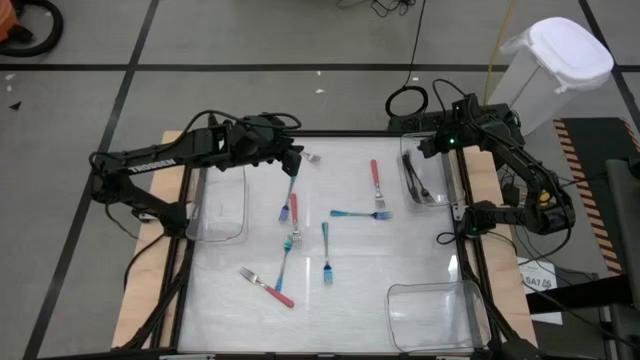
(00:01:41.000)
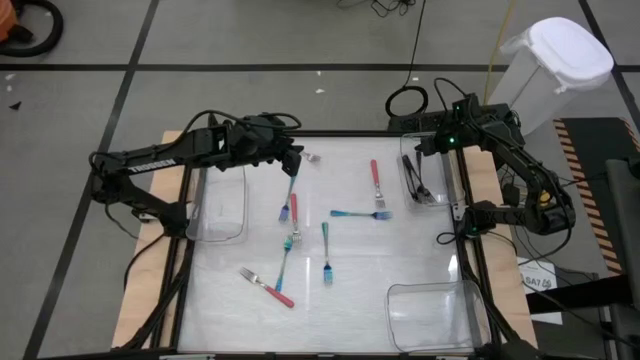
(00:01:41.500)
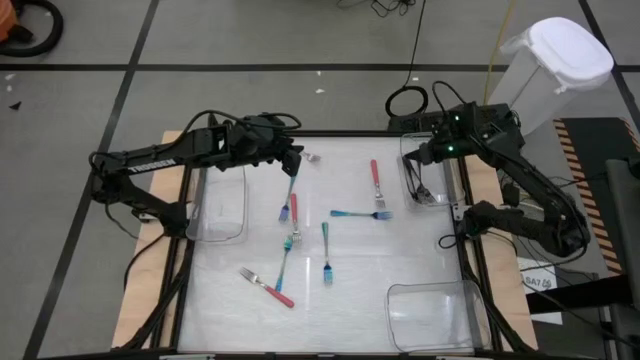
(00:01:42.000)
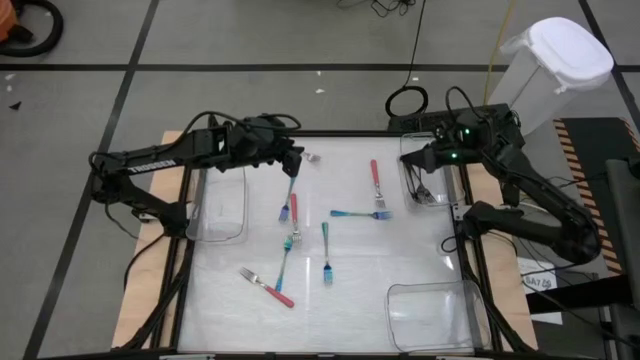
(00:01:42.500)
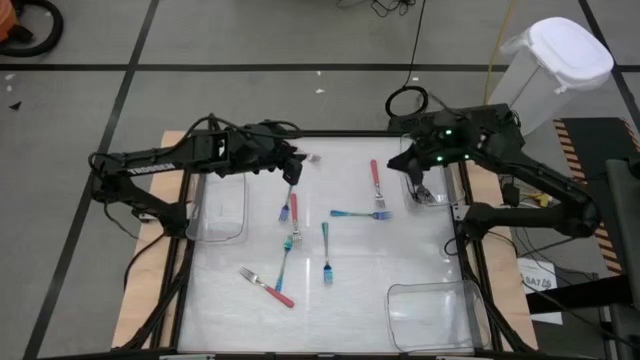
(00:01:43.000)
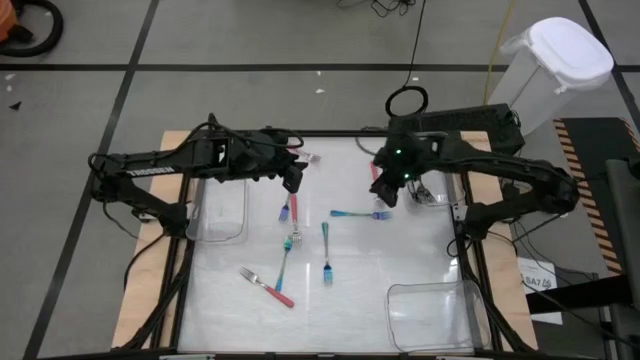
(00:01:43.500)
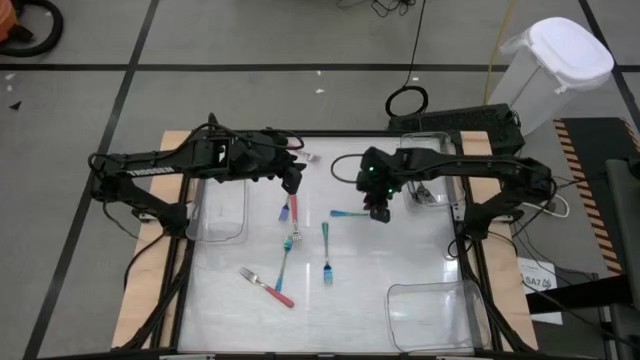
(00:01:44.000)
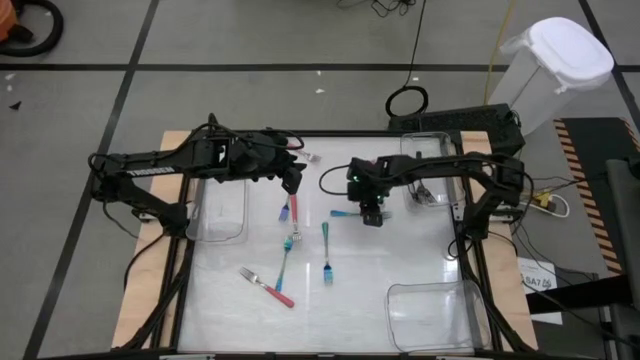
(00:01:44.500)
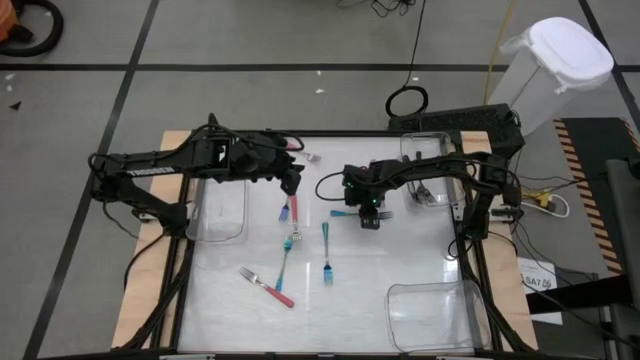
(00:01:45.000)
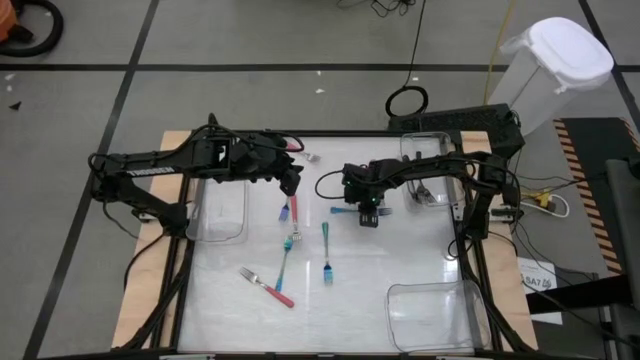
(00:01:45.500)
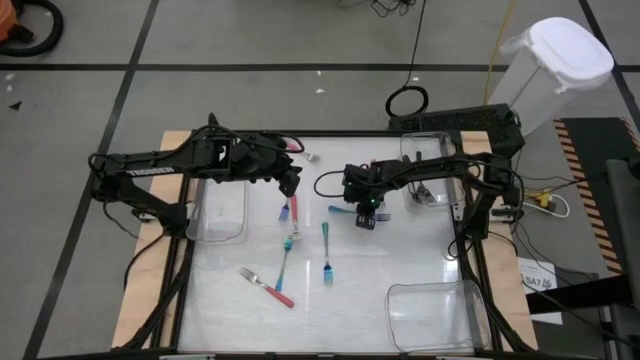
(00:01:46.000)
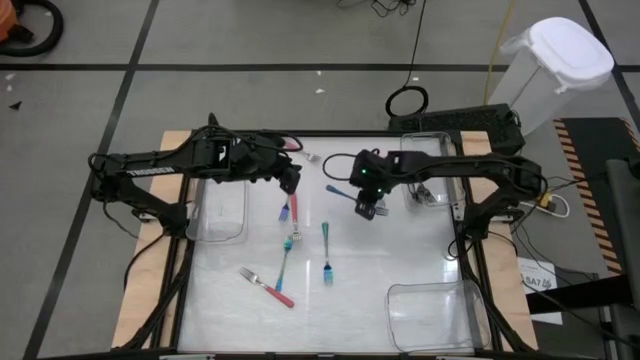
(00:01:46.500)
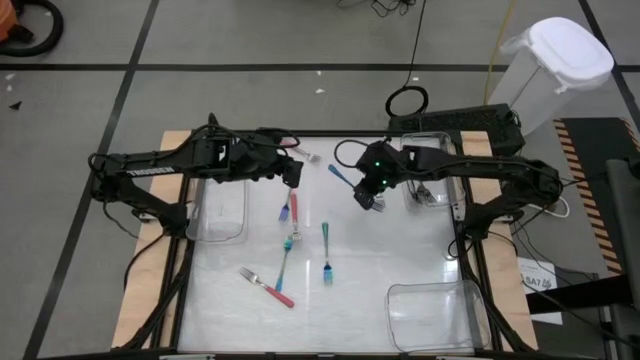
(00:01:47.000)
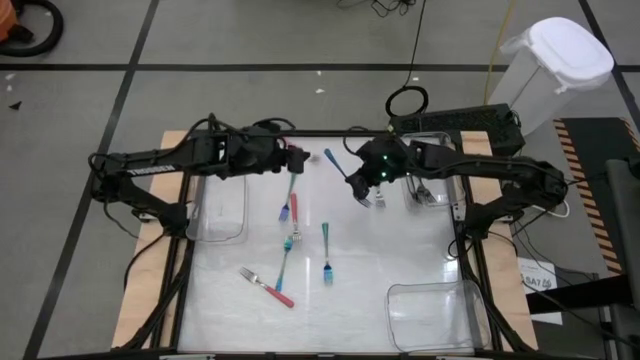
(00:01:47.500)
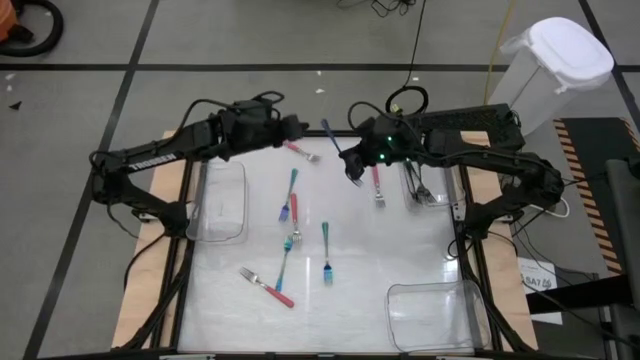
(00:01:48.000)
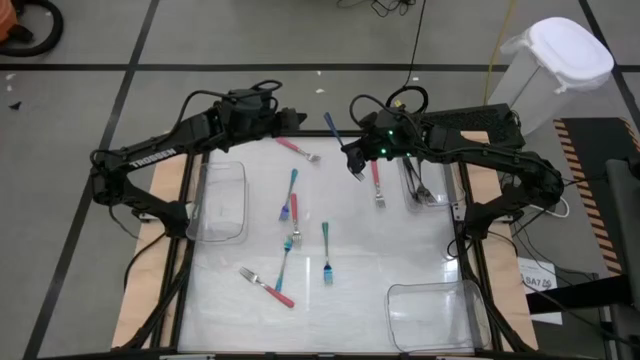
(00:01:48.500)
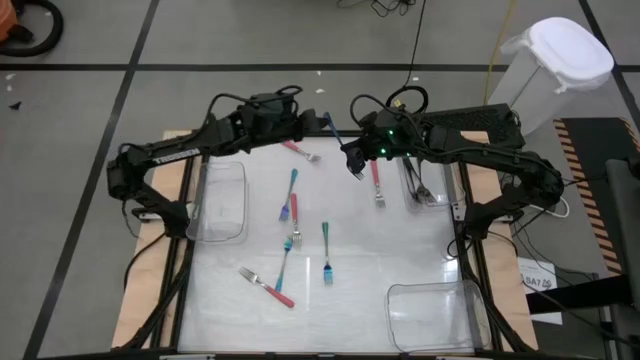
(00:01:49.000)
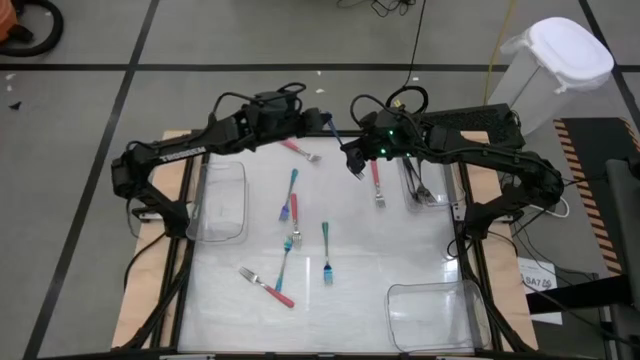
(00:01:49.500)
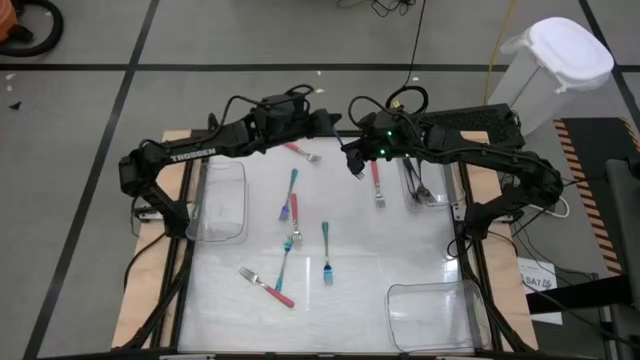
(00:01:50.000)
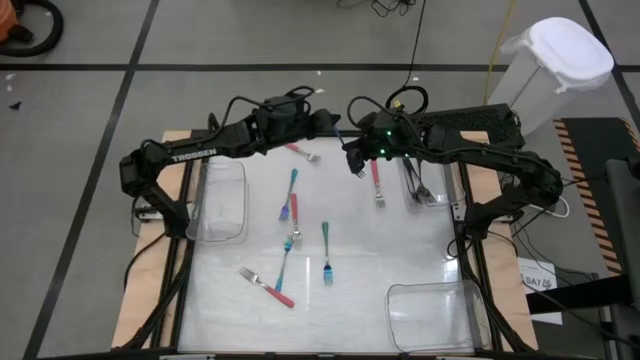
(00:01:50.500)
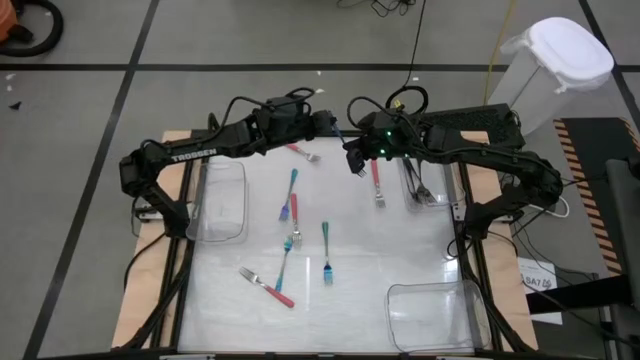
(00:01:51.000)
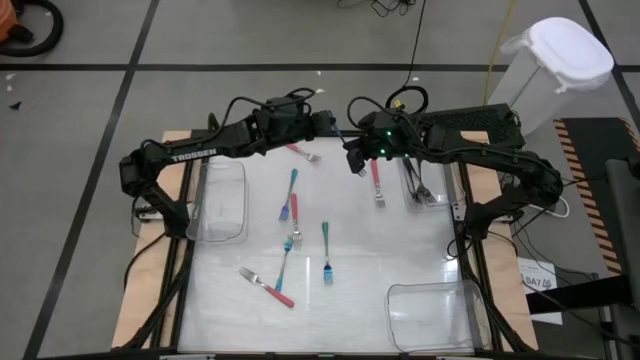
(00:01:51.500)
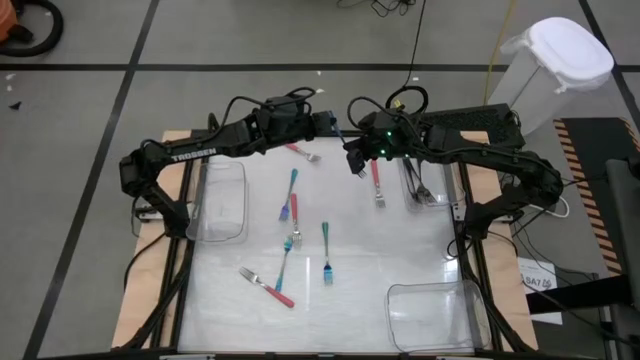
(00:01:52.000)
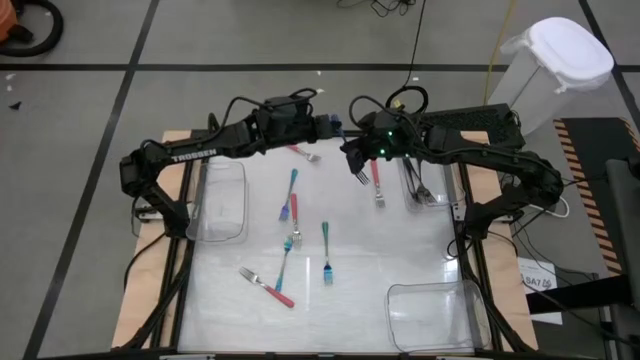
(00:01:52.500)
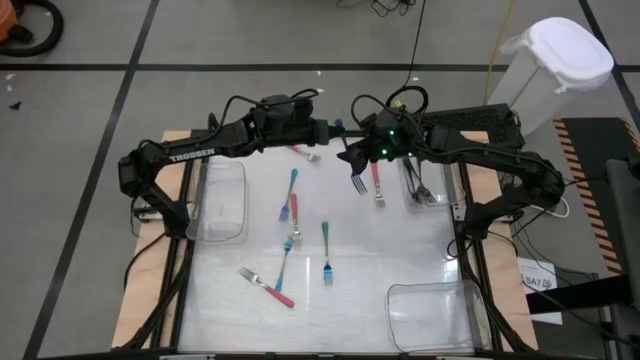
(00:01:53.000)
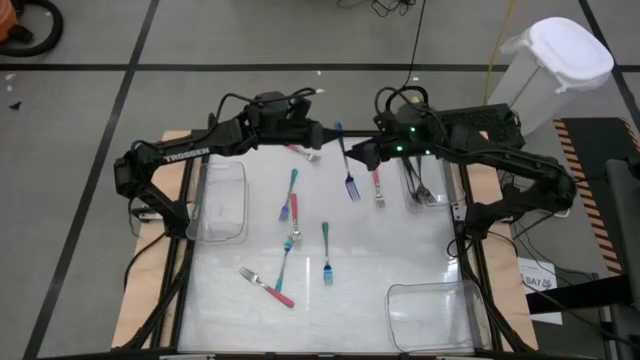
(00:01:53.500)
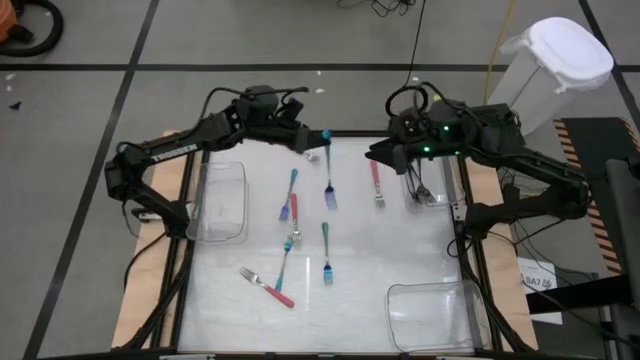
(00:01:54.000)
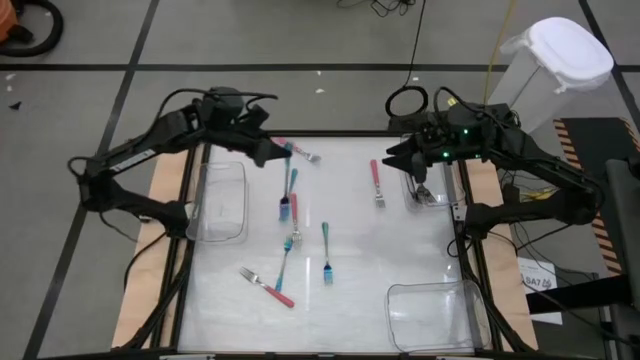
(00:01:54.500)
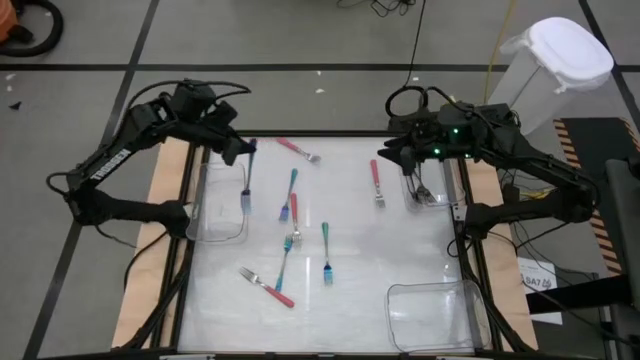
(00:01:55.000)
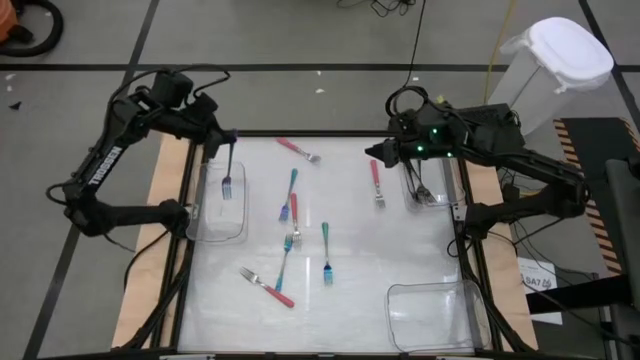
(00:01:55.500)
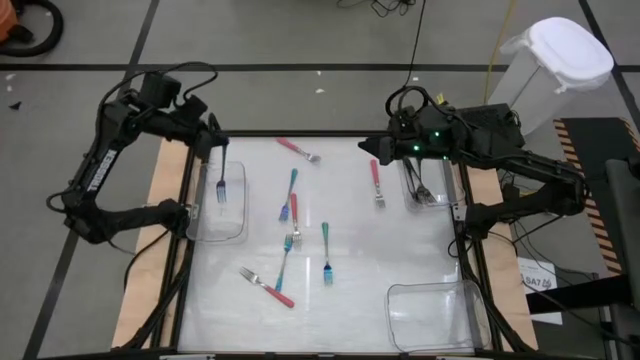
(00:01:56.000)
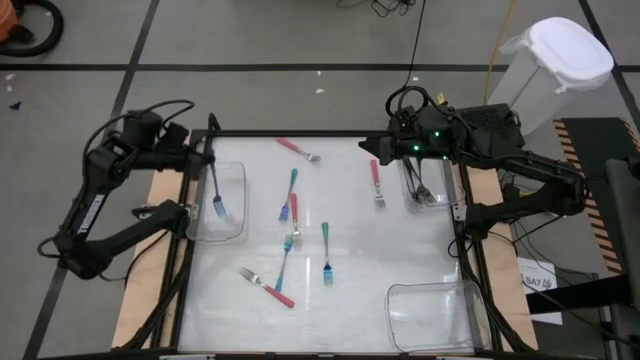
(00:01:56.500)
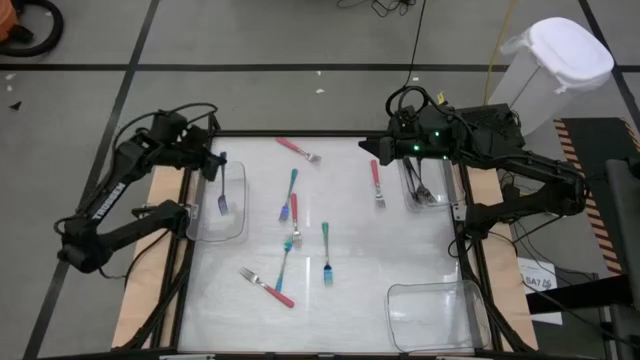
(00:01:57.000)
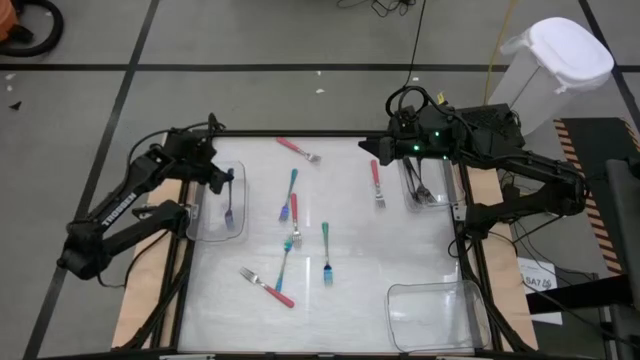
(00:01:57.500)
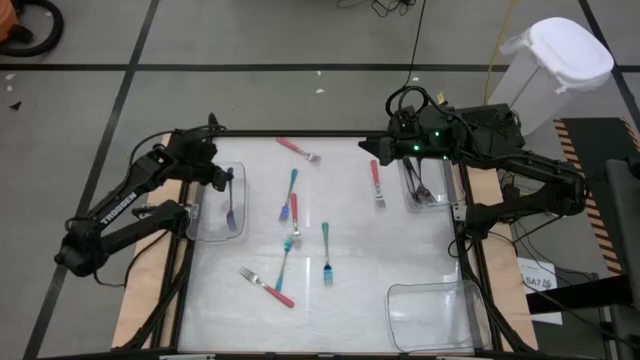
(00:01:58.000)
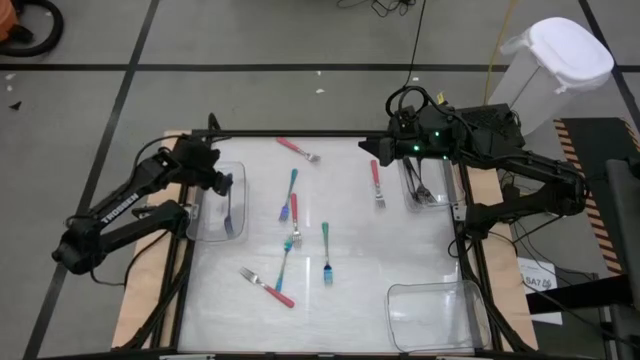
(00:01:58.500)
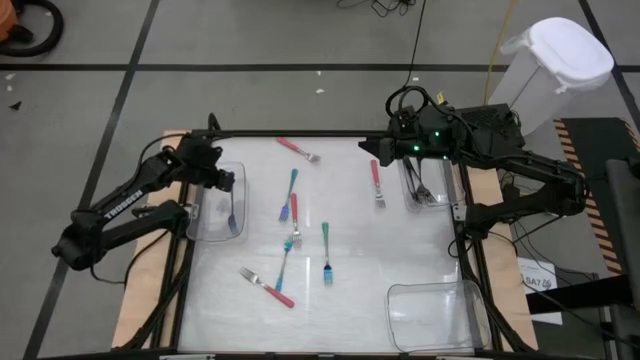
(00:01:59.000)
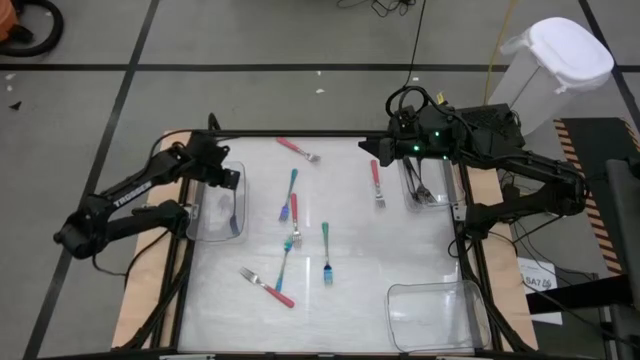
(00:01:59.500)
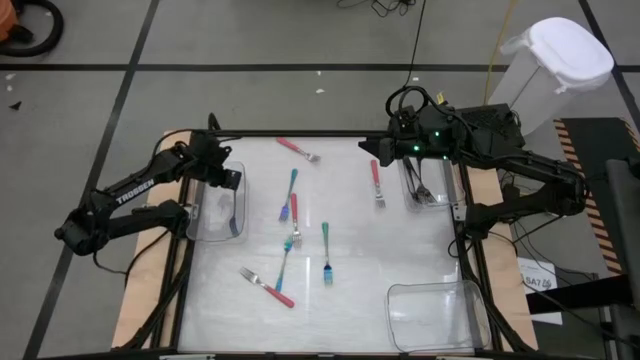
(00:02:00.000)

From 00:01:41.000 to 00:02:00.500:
Task: Sort silverware by color (type)
Put the blue fork into the left transparent bin
